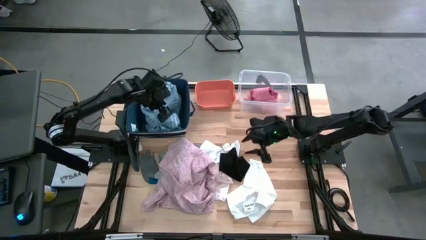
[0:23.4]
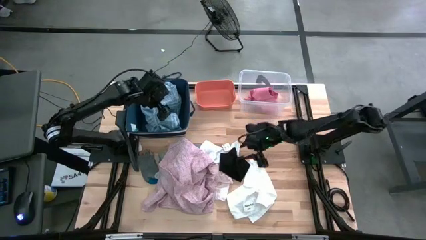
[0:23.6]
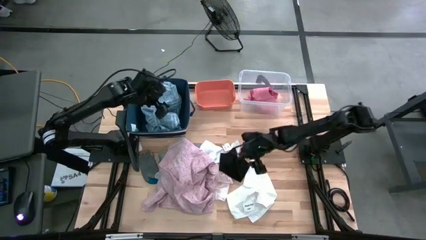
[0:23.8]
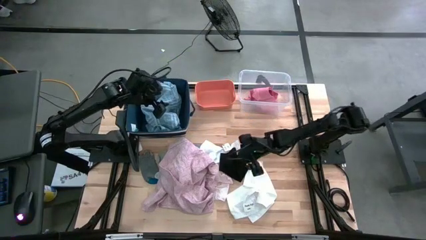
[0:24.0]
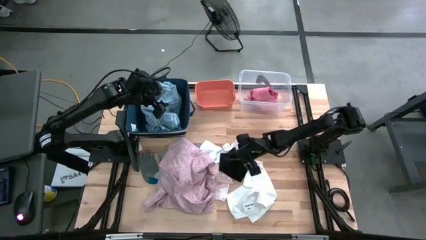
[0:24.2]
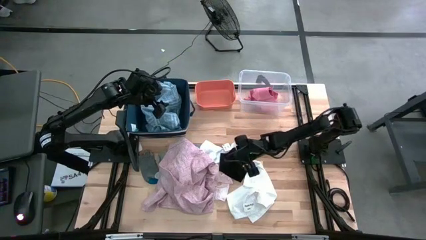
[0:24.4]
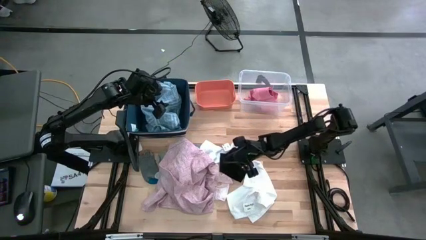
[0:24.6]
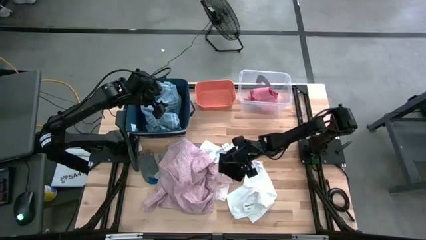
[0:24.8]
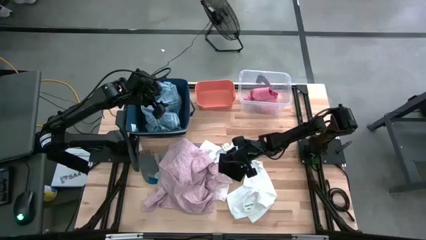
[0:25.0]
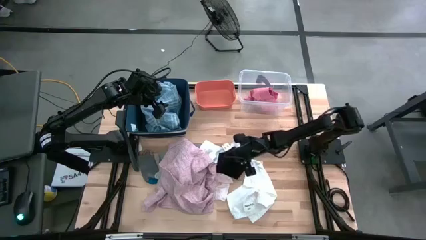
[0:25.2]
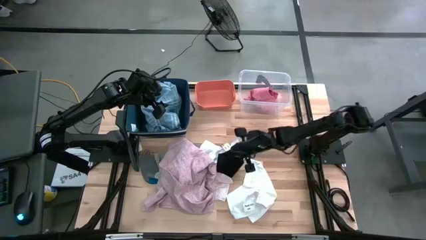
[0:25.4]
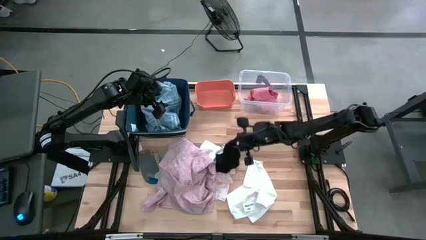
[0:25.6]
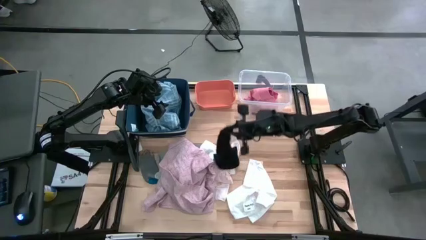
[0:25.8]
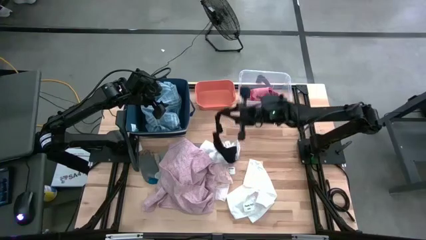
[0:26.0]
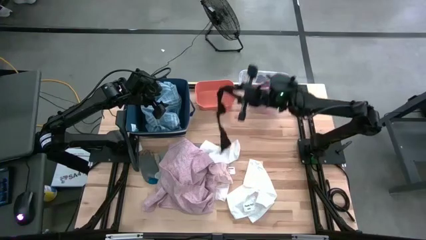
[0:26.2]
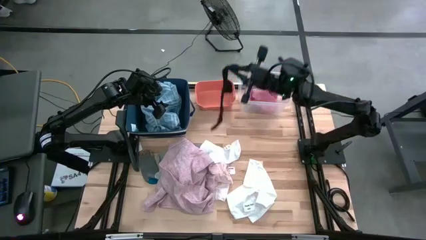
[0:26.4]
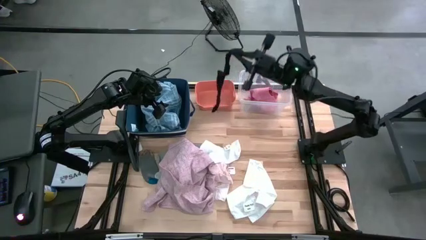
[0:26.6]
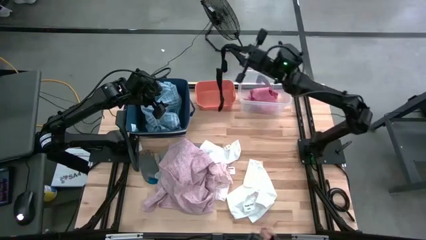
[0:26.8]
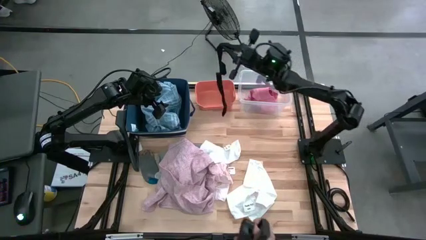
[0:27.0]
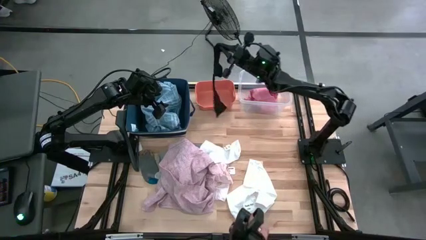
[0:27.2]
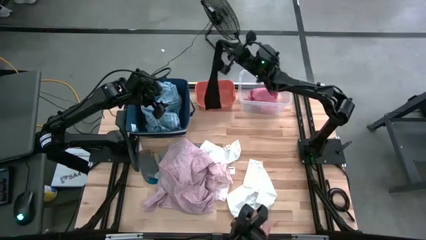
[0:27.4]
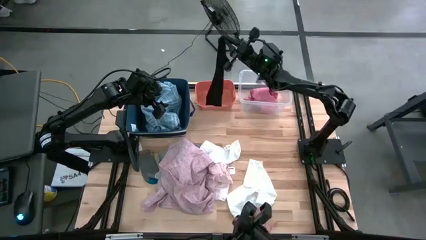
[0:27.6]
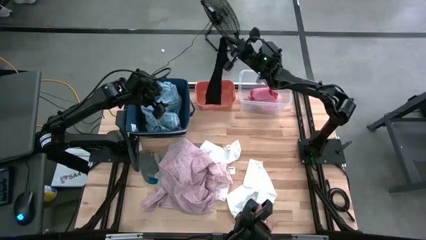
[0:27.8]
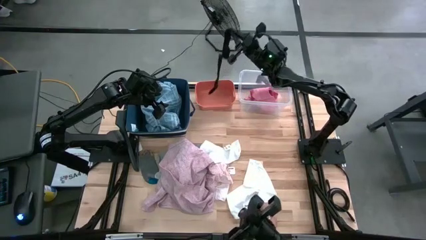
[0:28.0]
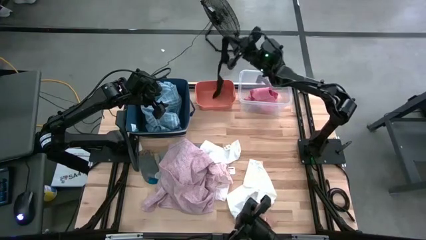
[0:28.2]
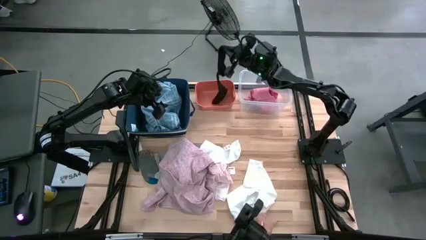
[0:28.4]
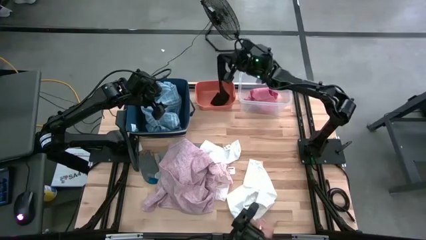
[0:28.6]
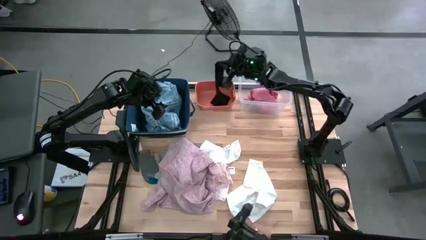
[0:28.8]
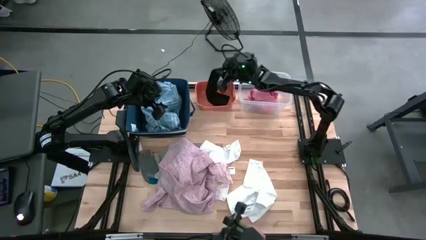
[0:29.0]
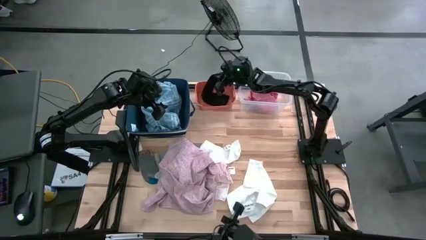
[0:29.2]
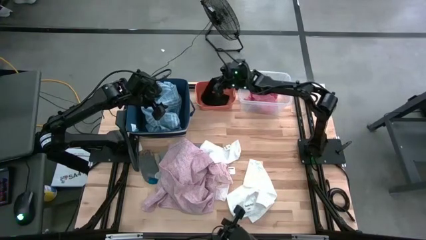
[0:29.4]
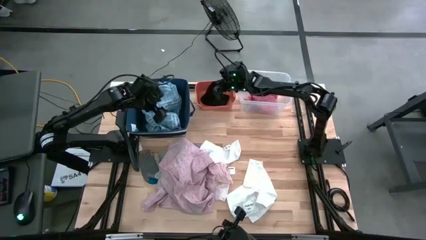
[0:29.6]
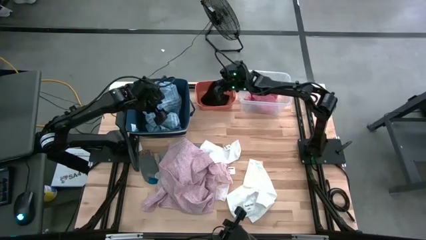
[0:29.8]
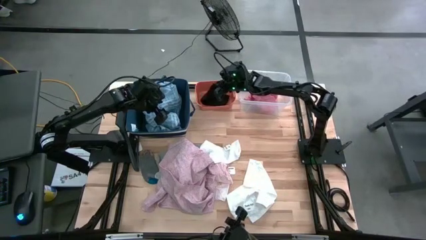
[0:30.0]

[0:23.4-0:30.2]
Task: Pick & Place Cloths
Put the black sock into the orange bin

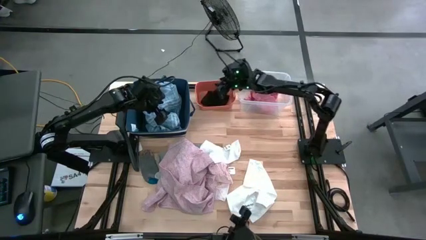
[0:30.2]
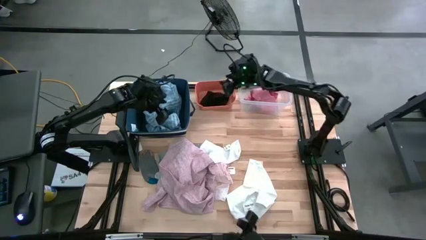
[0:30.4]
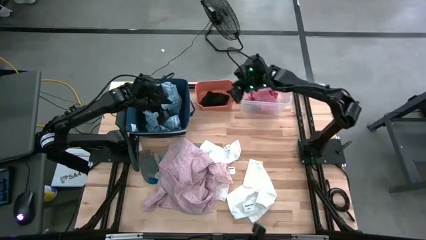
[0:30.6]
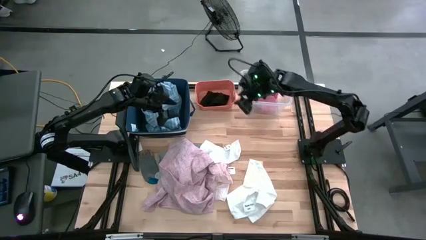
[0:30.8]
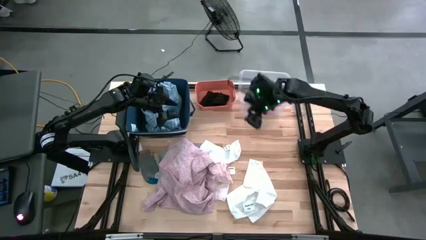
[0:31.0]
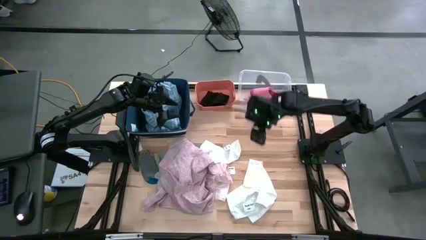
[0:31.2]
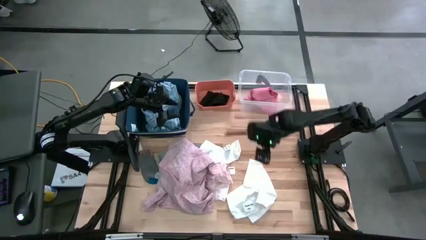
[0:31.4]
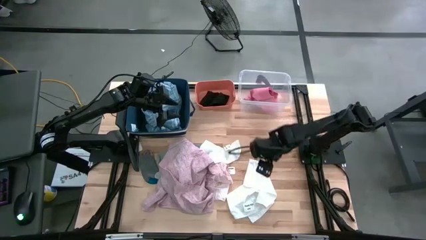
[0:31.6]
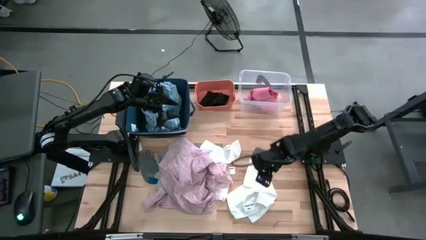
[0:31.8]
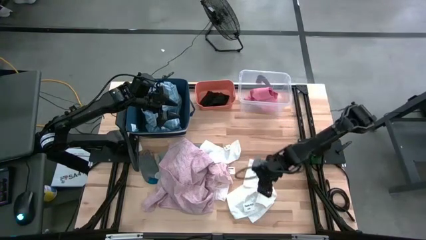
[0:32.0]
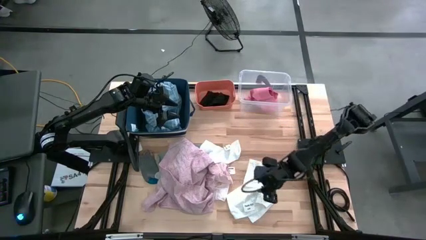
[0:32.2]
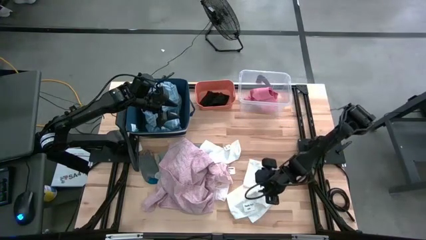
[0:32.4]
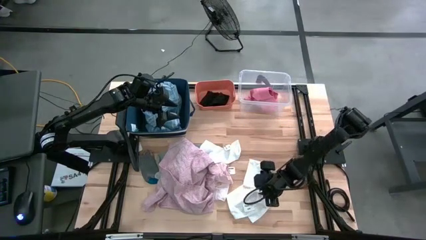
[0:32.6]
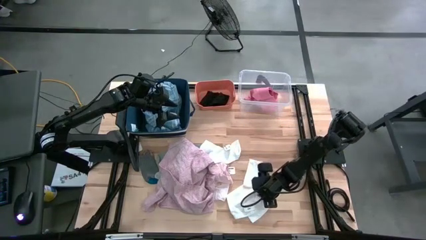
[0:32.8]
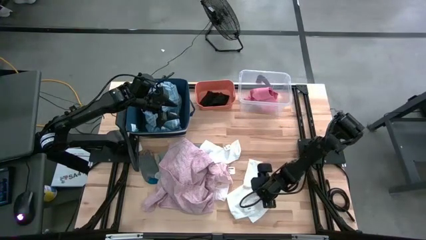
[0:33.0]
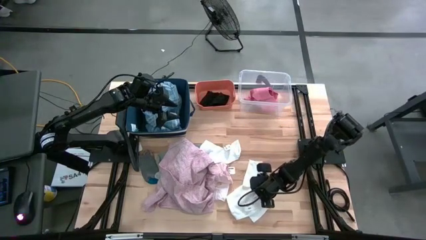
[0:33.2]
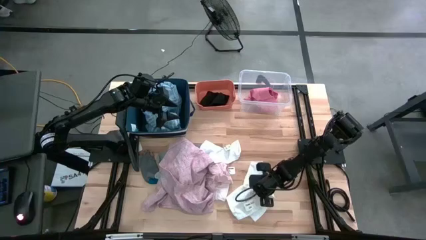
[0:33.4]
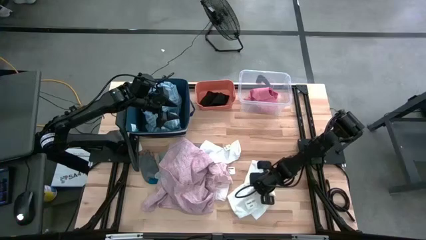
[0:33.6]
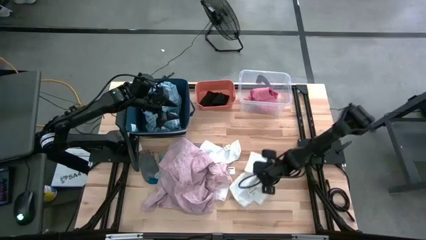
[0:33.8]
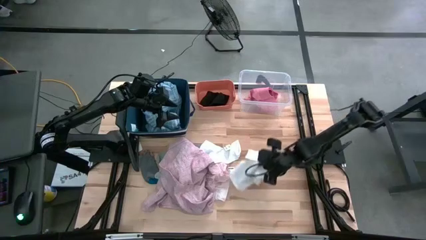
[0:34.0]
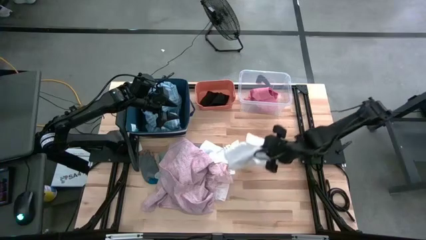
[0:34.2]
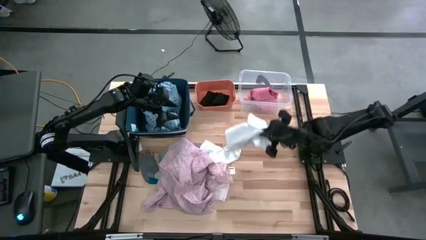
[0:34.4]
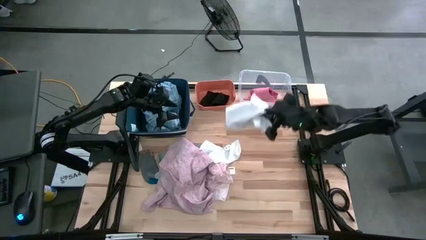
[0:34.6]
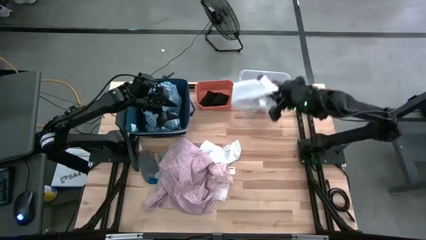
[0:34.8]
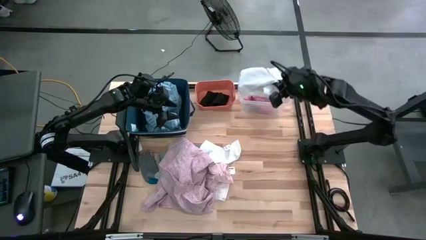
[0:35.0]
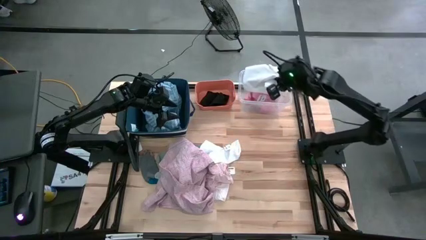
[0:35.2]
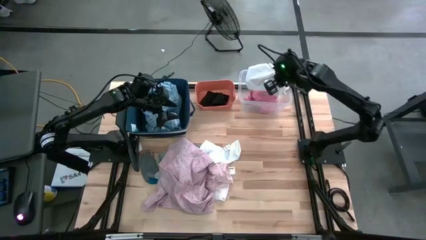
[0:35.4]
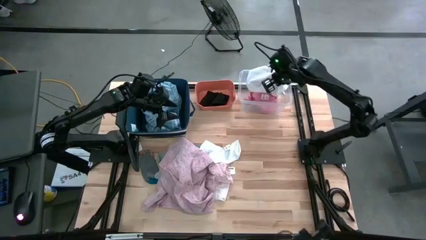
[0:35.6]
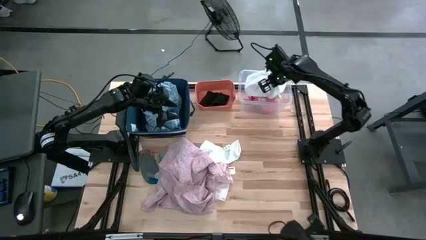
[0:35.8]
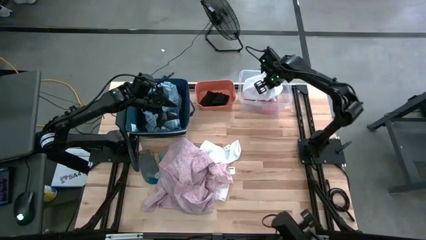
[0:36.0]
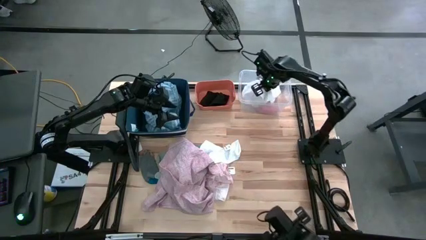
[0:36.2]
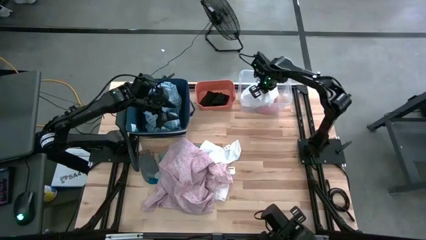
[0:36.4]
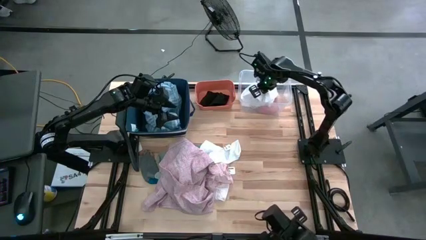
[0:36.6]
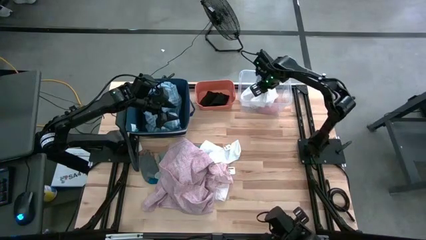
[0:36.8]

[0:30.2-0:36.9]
Put the white underwear into the transparent bin
